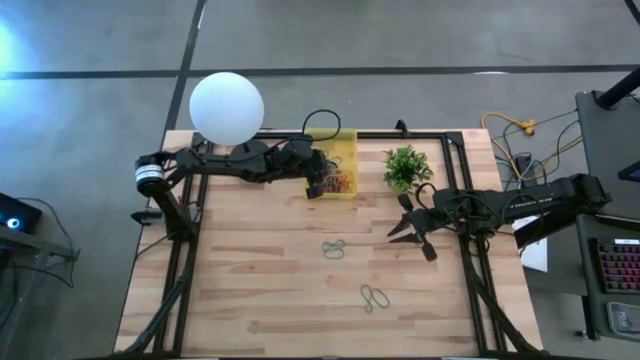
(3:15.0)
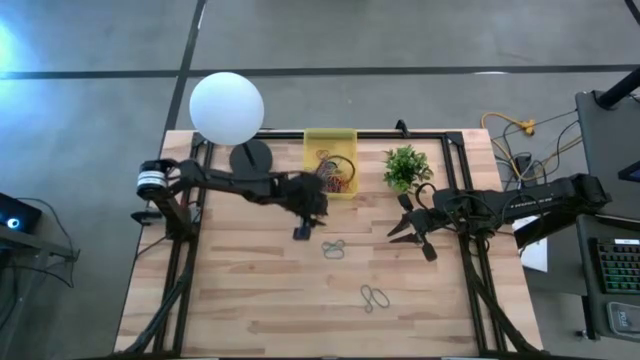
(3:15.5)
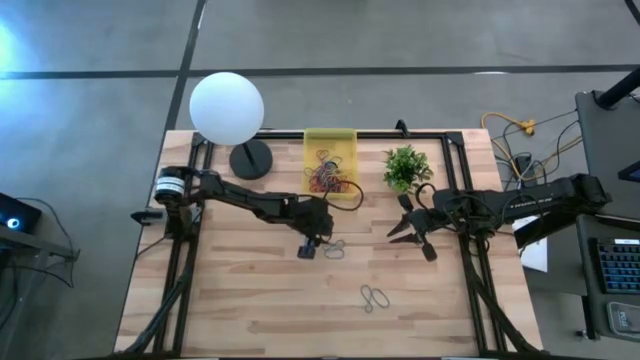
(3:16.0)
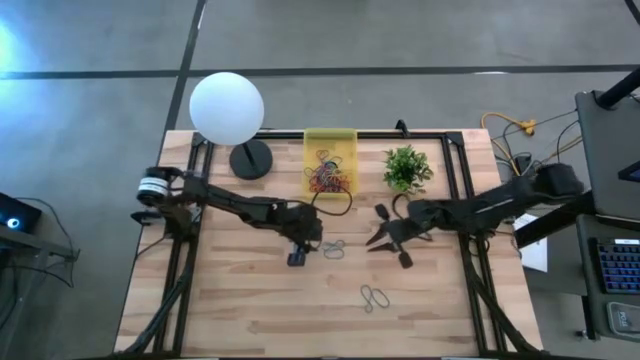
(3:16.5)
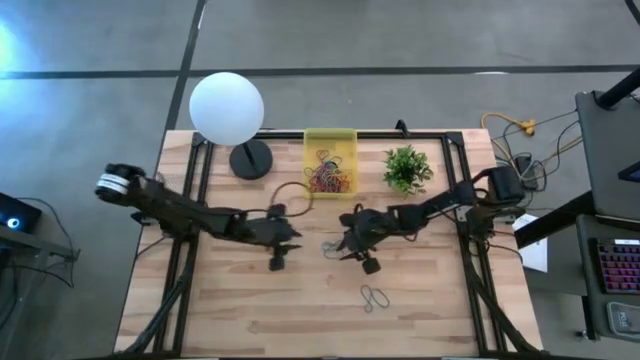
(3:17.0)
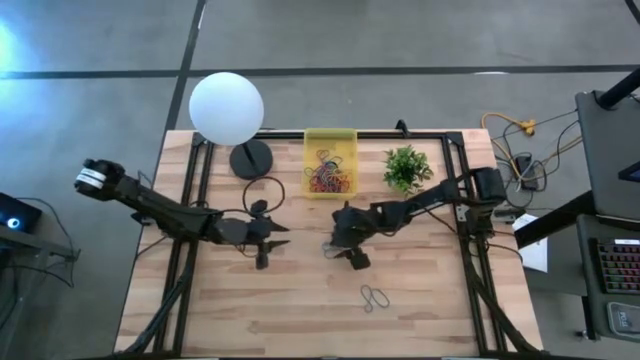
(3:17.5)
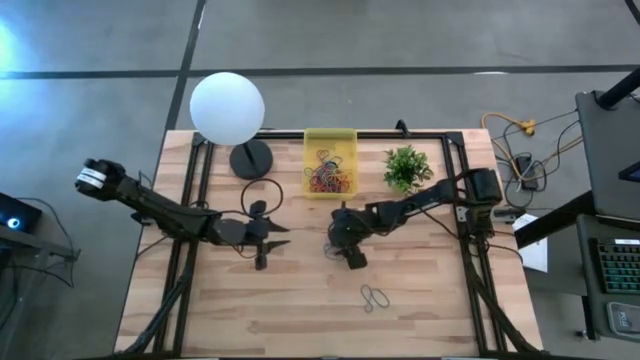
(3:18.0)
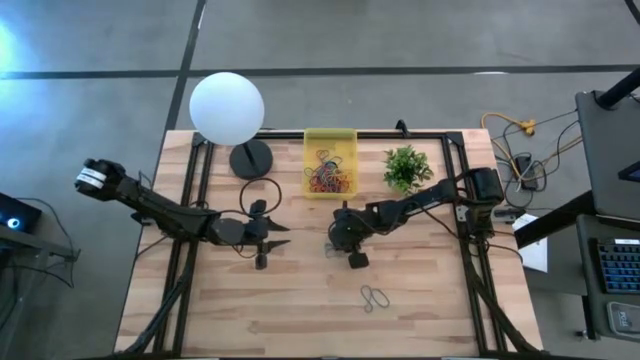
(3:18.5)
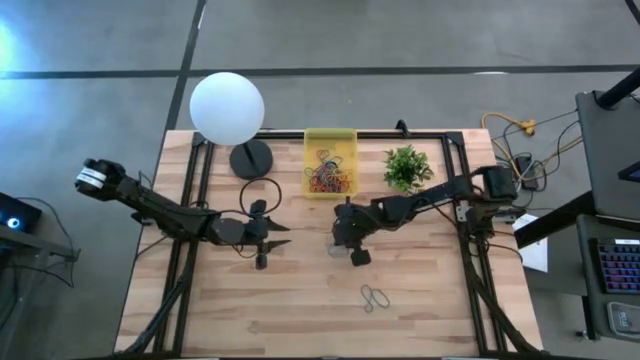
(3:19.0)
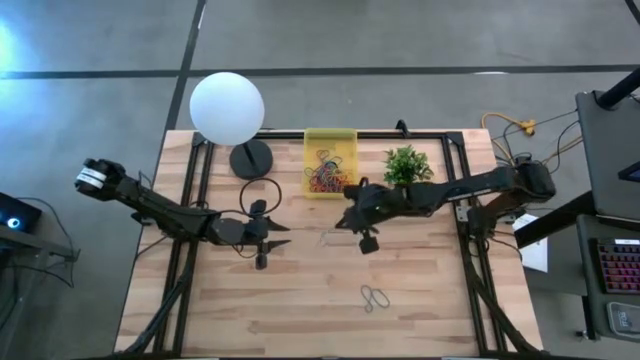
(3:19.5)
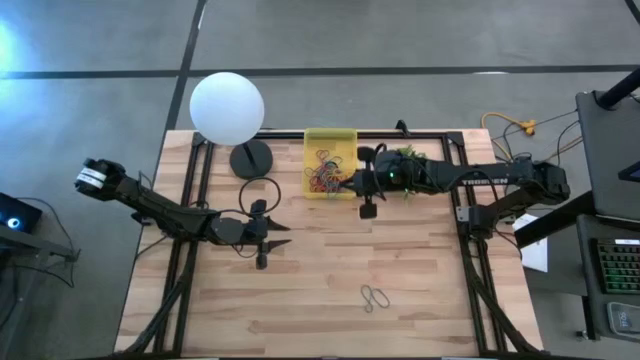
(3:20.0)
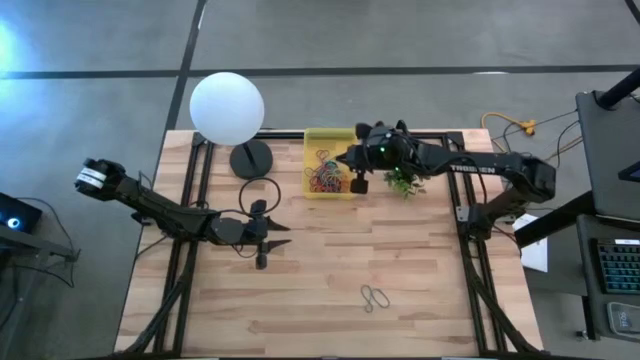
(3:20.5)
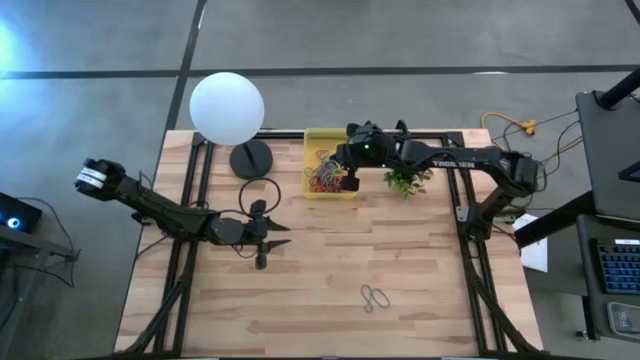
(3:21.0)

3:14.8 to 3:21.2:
Task: Pick and place rubber bands into bin
Put the blue rubber band into the yellow bin

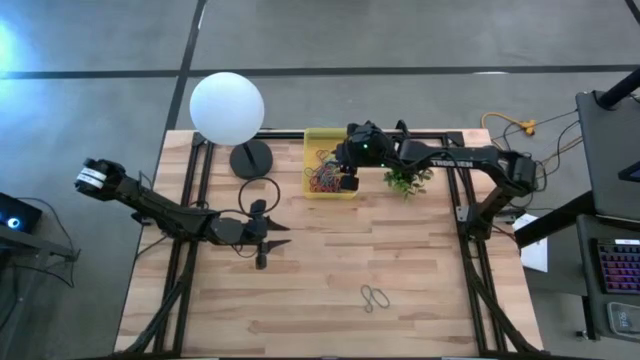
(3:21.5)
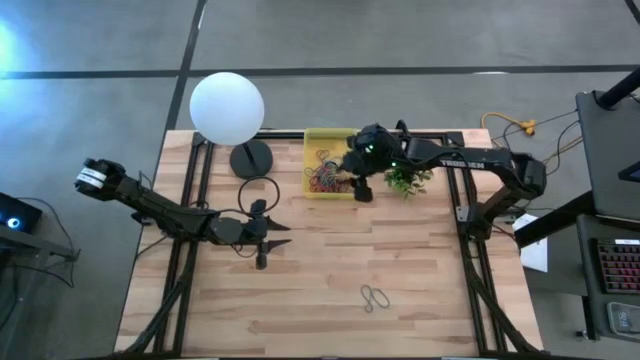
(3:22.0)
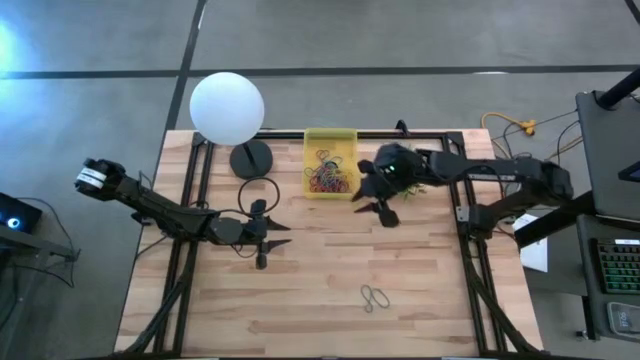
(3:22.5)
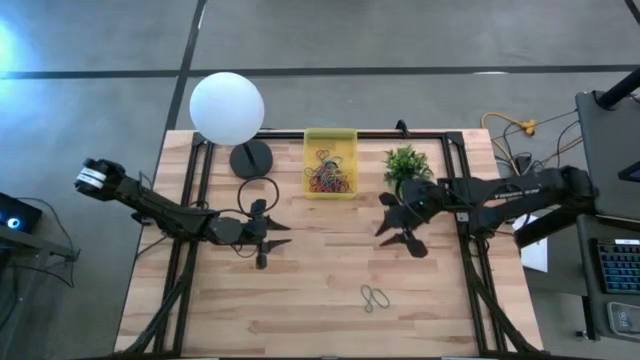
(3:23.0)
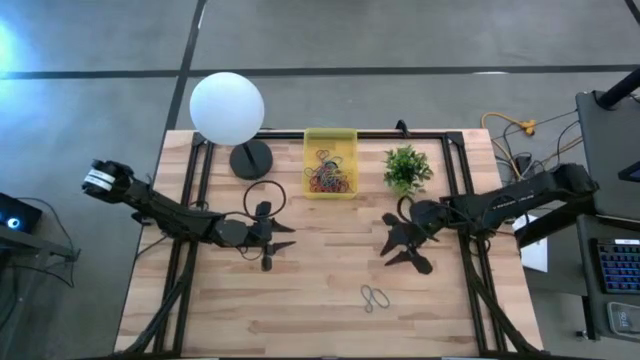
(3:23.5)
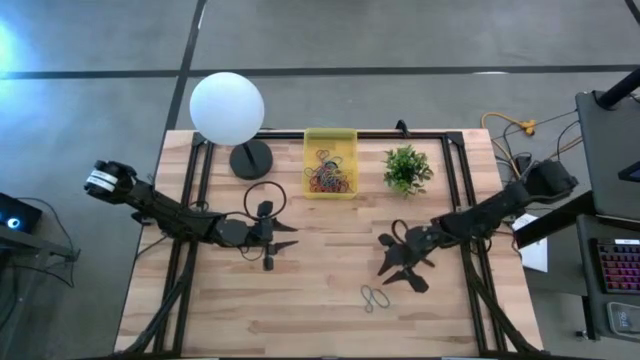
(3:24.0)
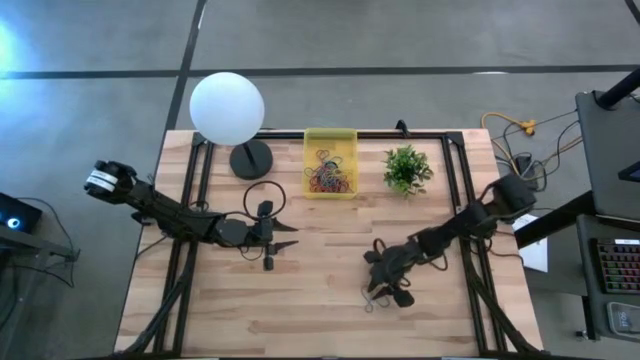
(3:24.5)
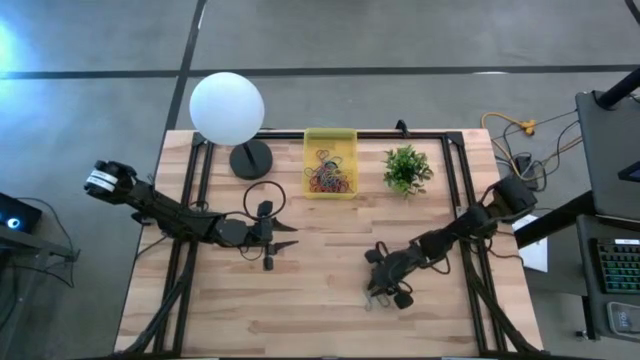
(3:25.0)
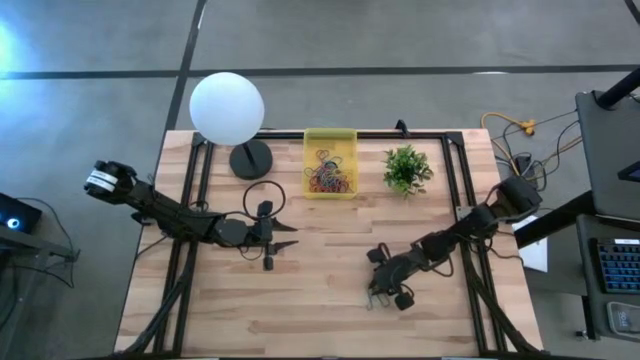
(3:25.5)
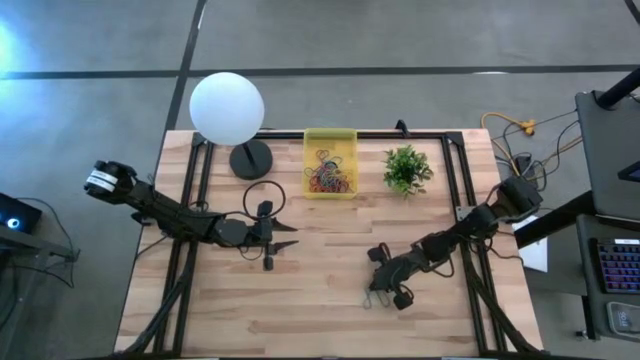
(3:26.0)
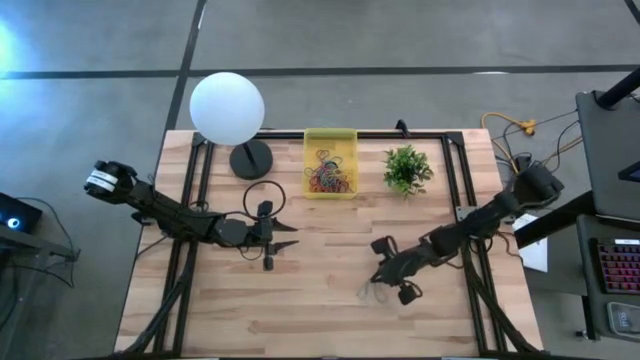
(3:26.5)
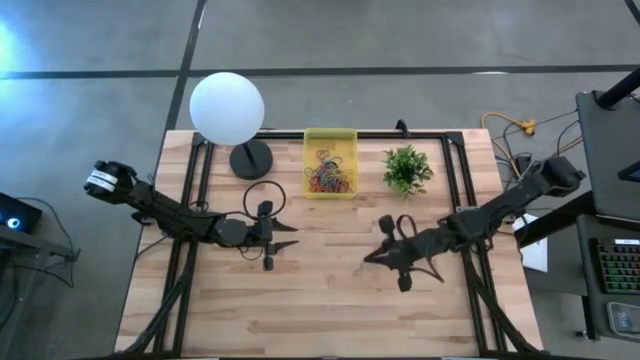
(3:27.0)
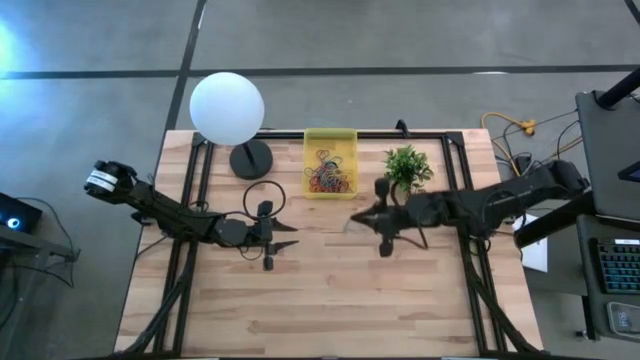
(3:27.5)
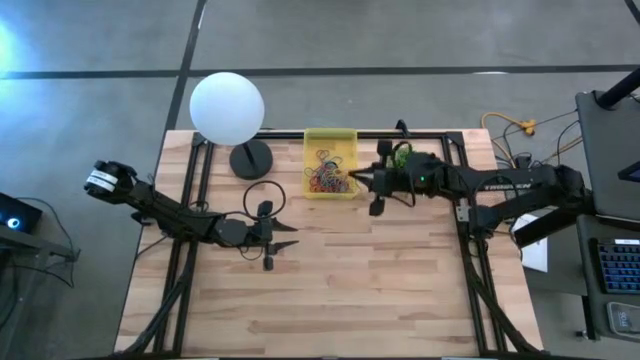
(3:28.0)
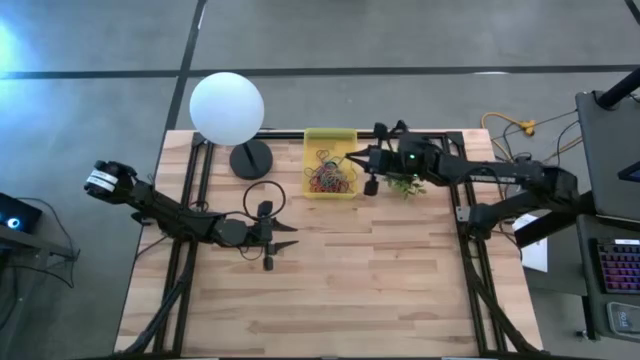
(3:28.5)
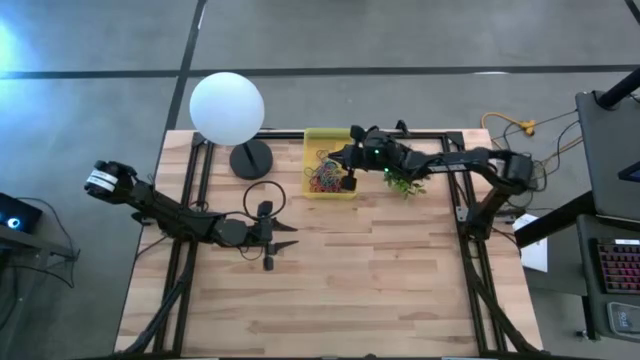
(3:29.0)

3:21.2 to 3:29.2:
Put the blue rubber band into the yellow bin
